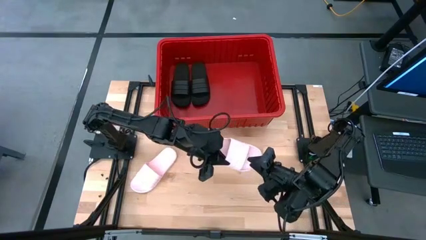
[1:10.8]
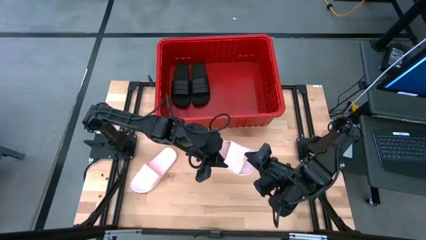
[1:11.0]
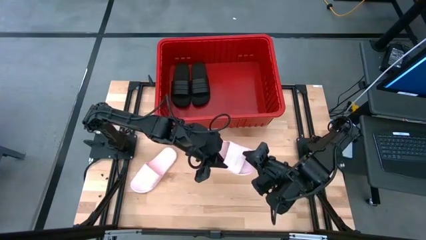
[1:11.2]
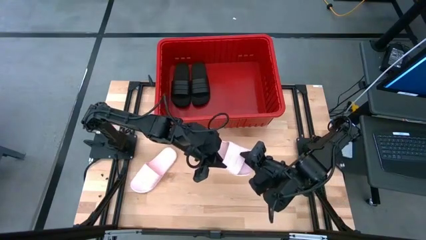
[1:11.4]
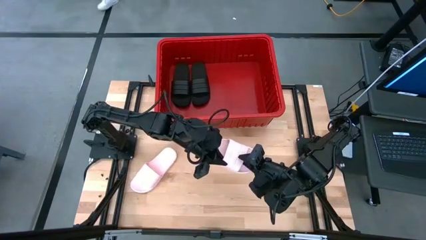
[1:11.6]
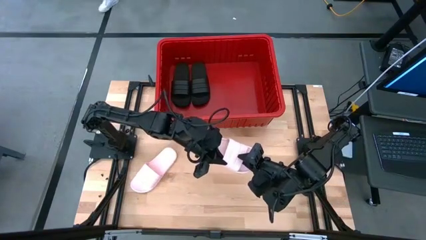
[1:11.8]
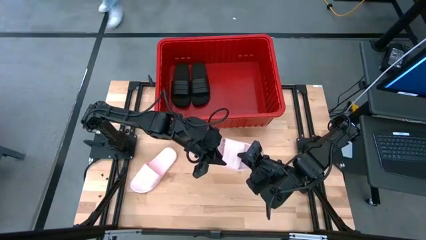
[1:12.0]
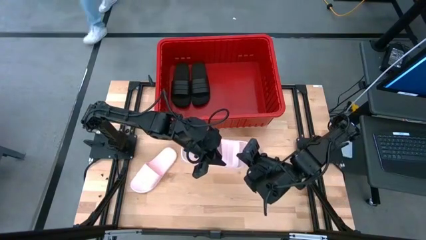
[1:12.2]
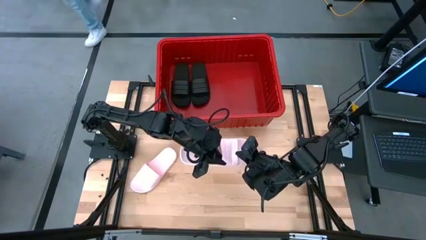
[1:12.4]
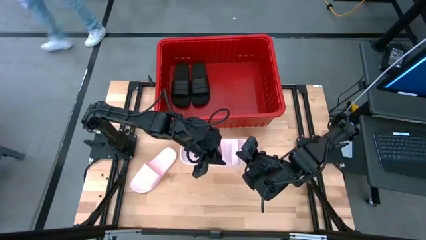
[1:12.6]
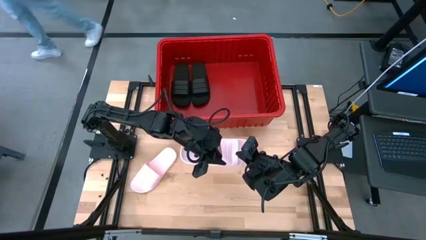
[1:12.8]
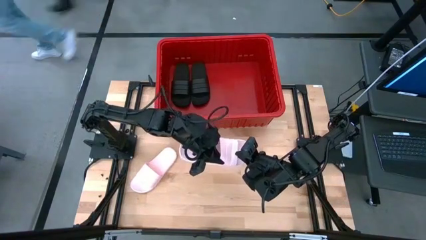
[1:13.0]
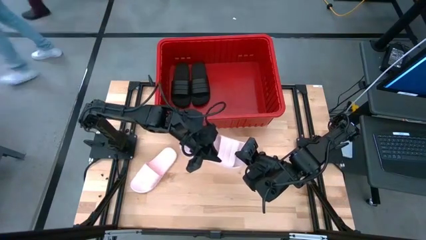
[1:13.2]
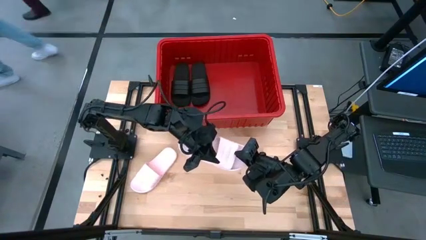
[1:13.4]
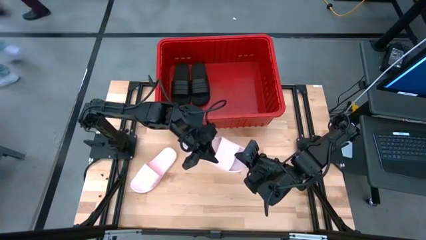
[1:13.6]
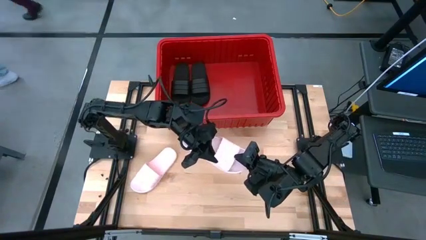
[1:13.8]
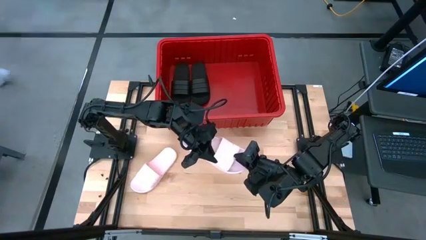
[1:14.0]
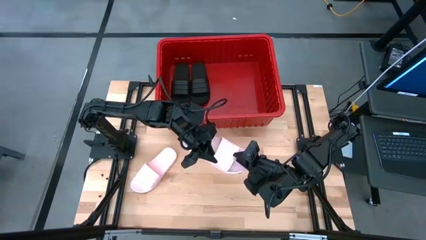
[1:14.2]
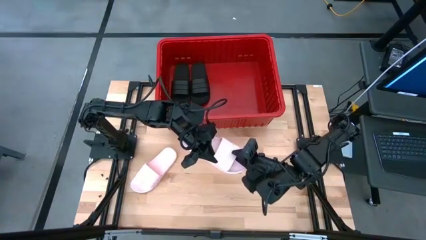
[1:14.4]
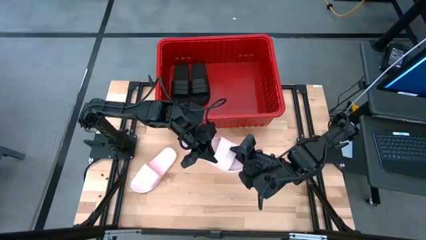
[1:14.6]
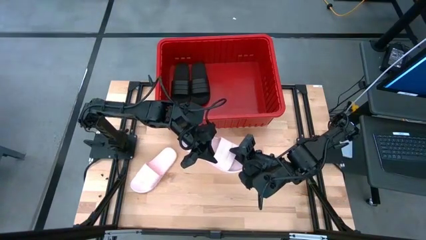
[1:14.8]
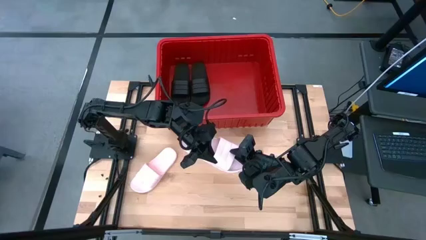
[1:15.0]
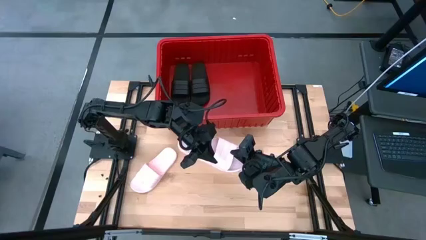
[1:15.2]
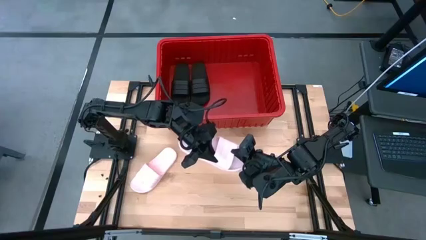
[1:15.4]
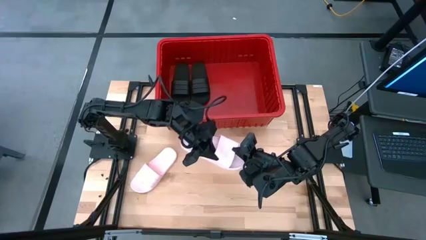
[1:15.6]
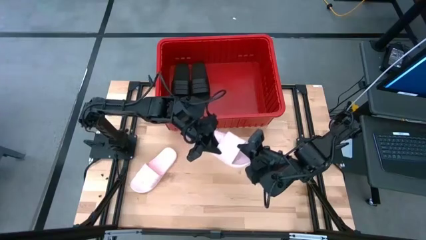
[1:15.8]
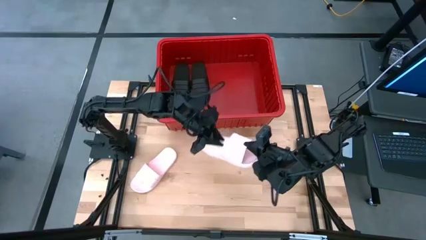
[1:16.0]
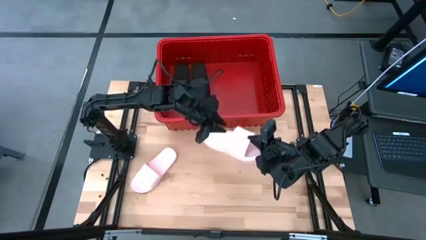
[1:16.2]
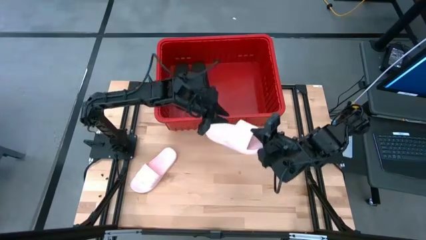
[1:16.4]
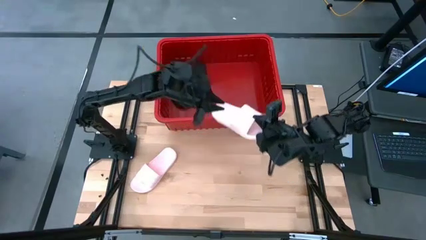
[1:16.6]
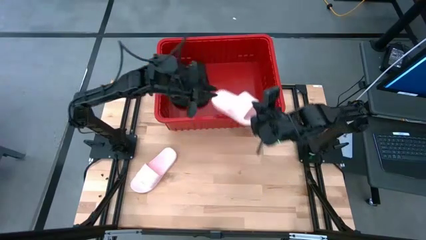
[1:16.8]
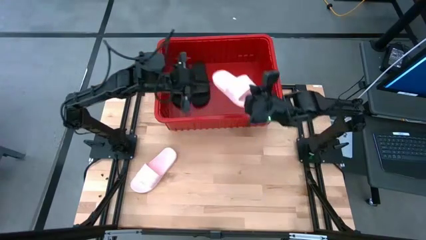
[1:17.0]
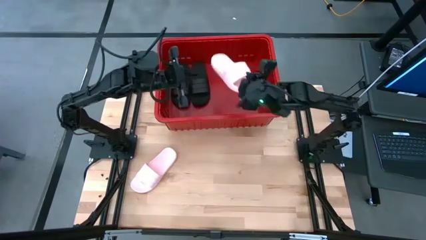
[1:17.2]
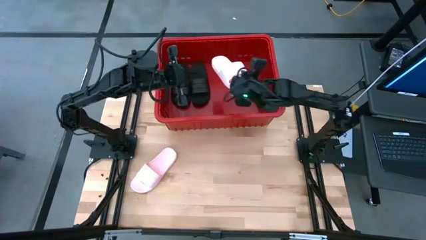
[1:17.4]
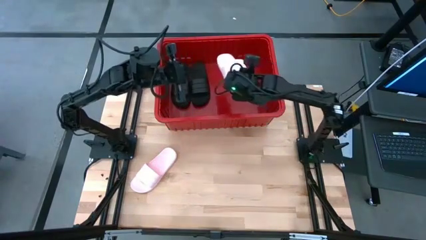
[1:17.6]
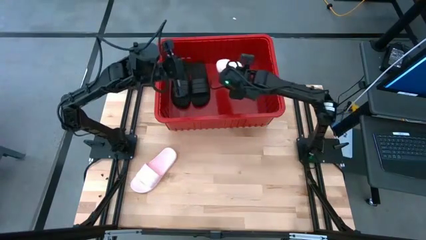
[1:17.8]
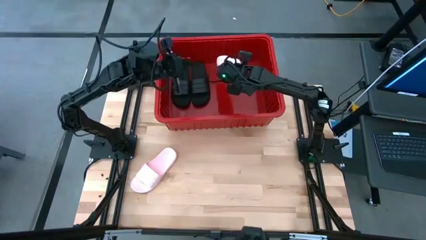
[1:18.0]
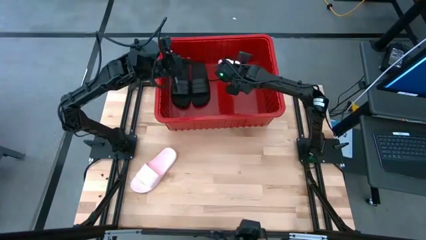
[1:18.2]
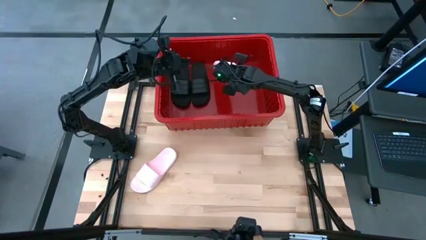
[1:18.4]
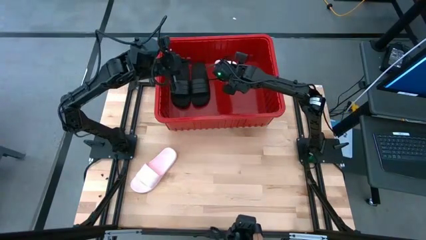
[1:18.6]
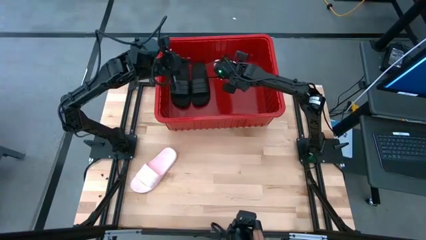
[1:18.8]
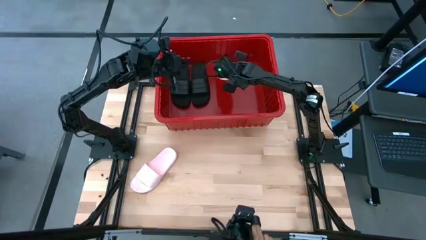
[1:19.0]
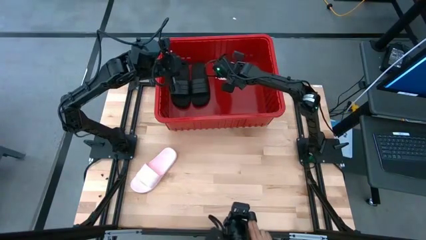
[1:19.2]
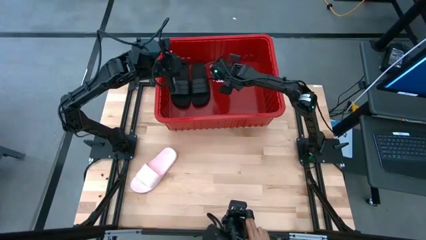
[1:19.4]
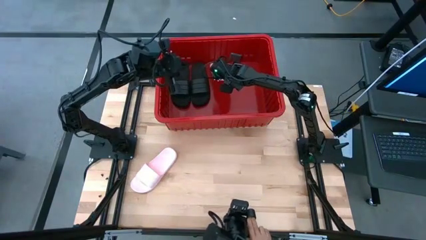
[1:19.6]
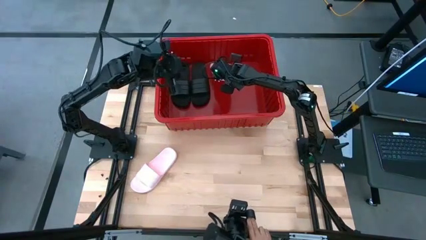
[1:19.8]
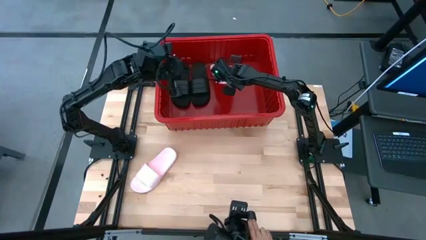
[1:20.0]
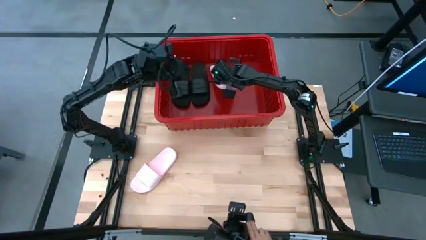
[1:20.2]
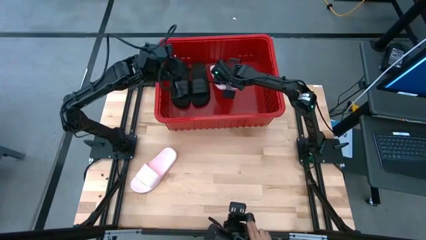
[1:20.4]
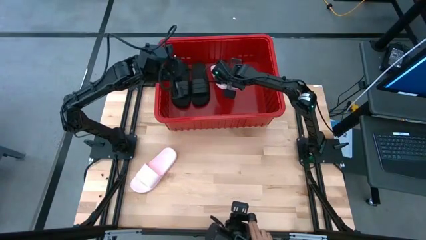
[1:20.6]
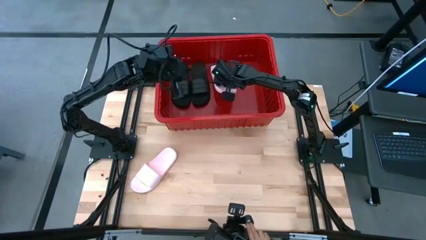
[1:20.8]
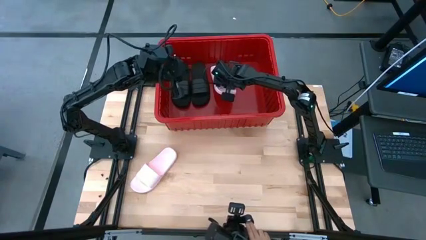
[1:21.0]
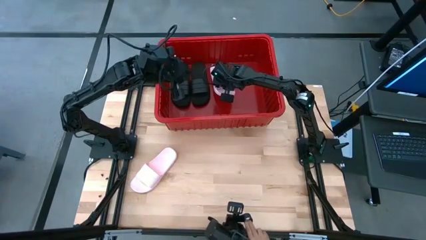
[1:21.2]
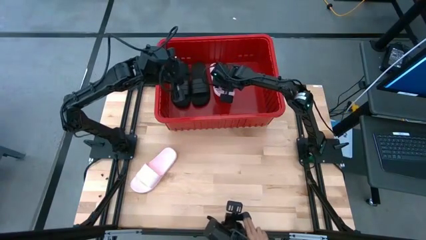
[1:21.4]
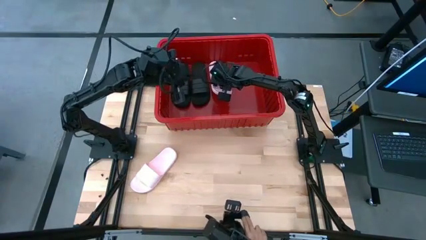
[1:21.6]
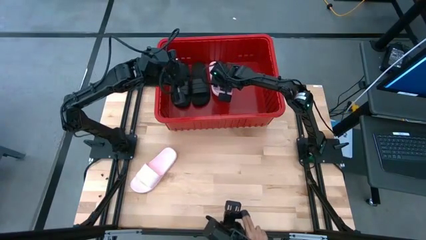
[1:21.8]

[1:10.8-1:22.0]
Task: Pick and place slides into bin
Put the right pink slides into the red bin

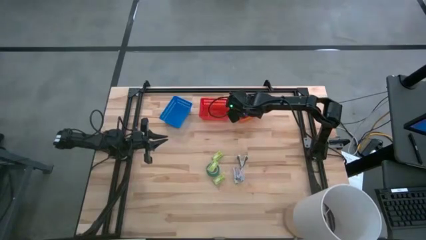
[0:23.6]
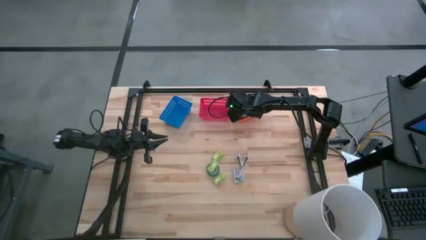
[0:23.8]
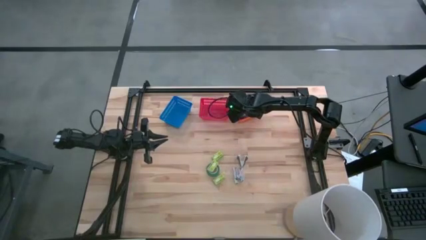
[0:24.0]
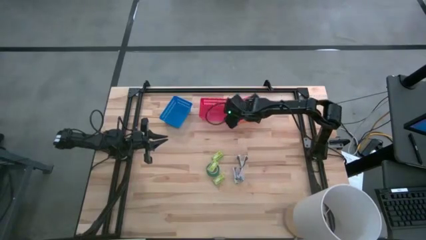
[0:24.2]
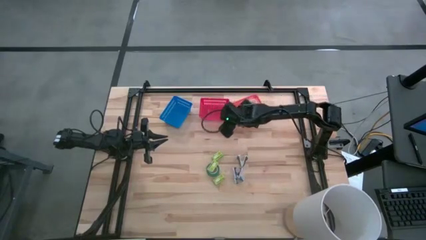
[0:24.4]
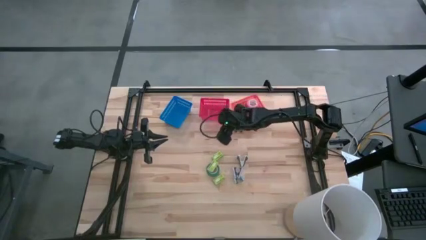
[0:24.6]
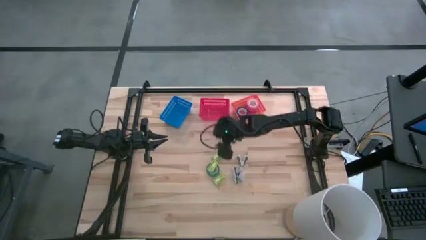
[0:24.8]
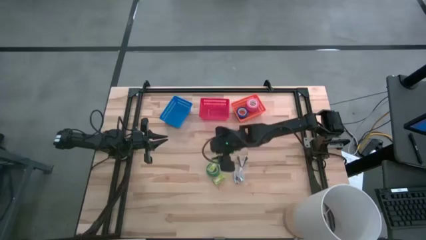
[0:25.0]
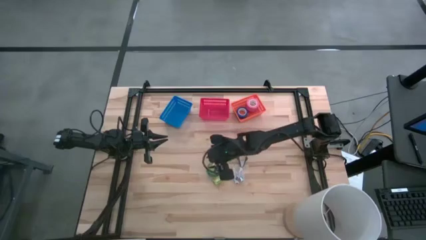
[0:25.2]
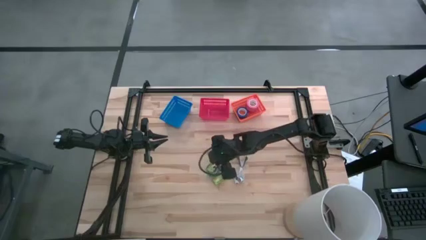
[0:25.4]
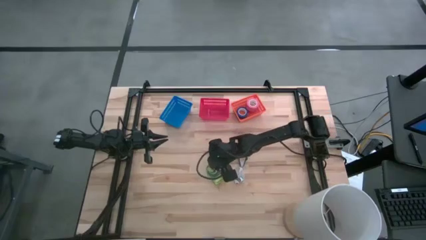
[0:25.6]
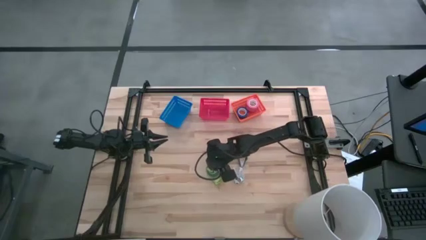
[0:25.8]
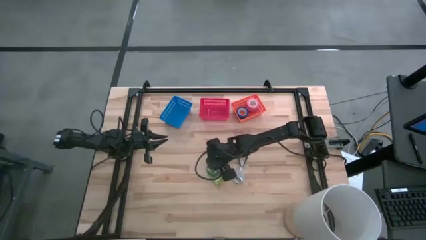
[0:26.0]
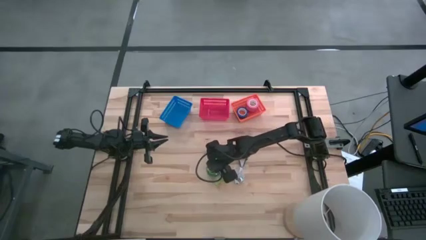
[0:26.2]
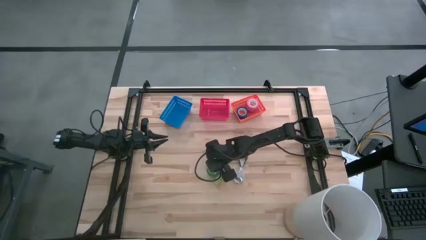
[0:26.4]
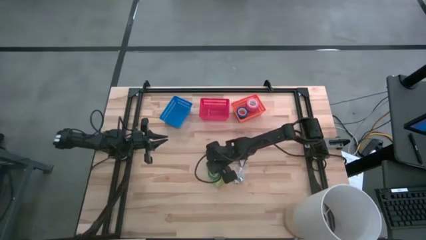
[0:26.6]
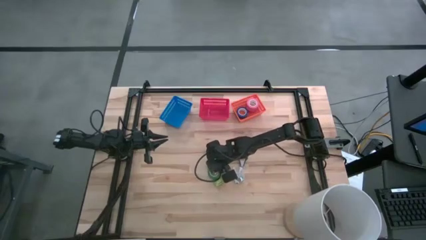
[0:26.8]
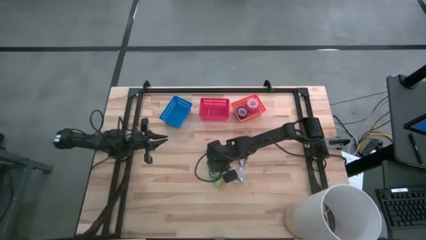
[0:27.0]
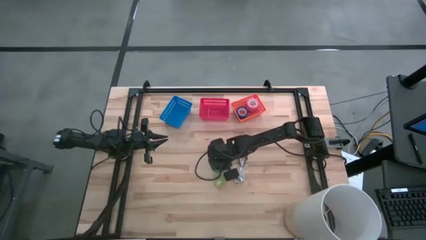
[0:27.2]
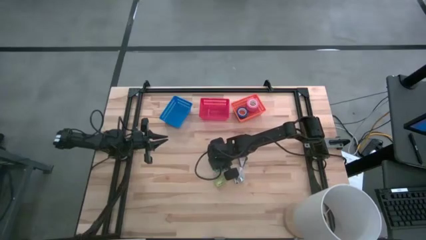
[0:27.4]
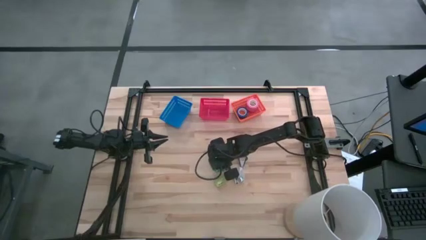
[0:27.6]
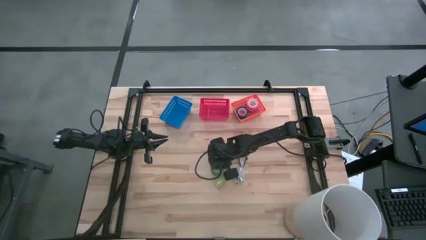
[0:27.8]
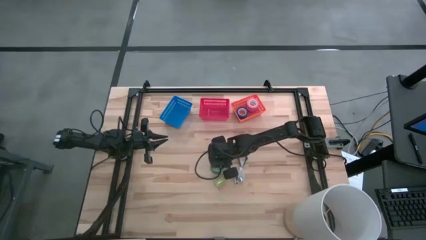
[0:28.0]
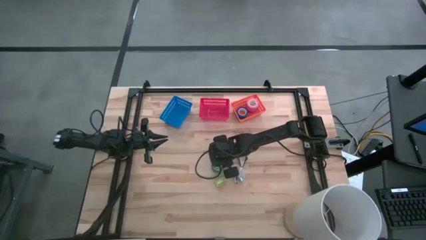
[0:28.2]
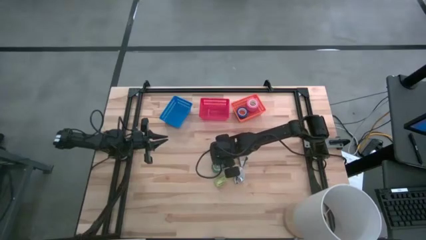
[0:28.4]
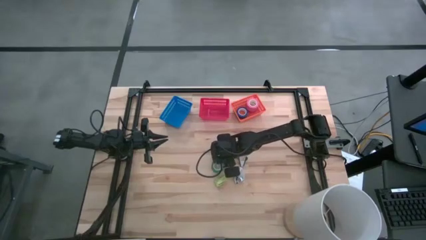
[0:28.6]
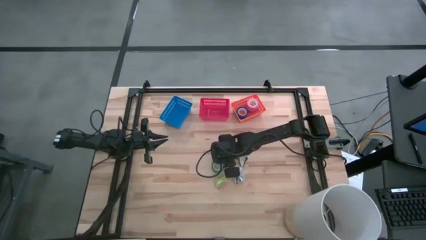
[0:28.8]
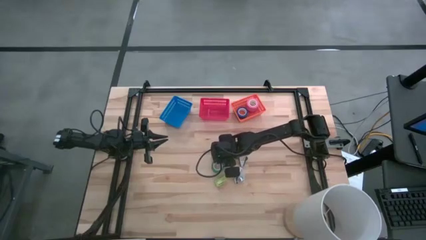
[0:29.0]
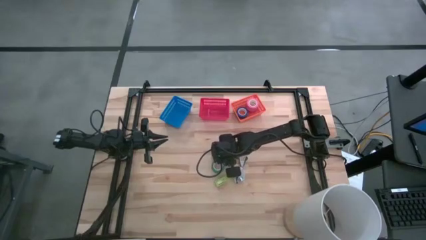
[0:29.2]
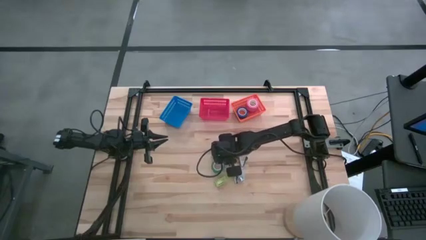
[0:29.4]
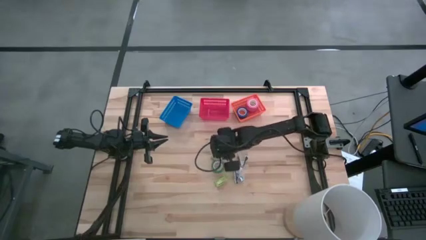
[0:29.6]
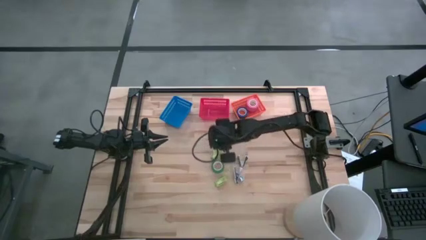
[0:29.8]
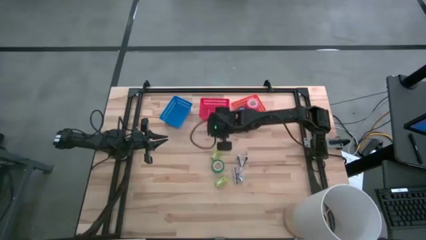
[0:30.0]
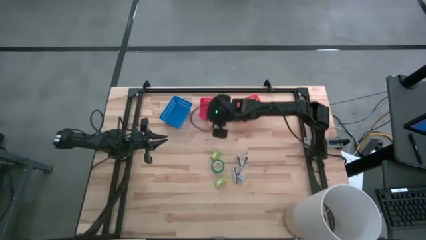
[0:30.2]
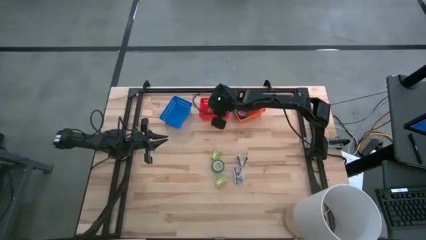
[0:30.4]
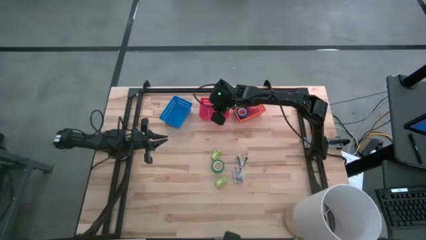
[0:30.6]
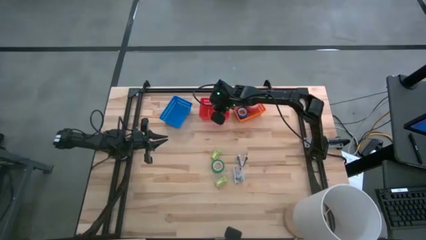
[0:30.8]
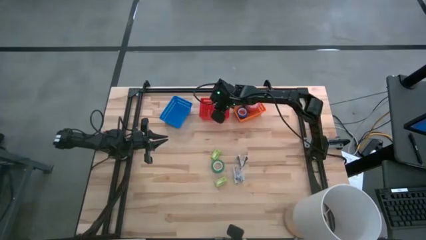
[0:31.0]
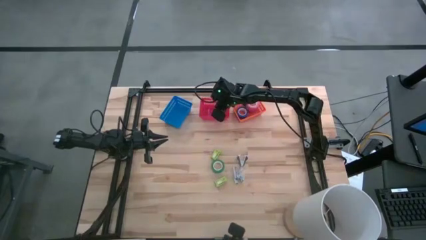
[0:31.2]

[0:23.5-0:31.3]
Task: Pick and place Stapler, Stapler remover, tape
Put the middle staple box into the red bin
